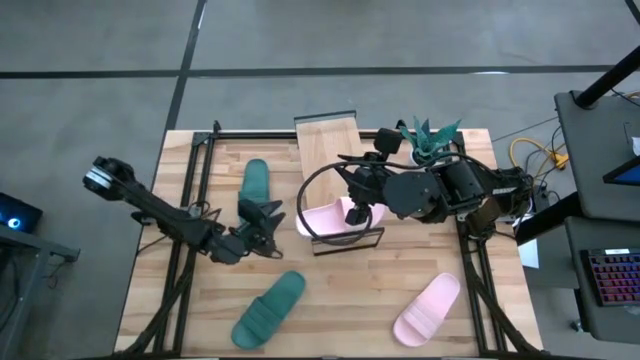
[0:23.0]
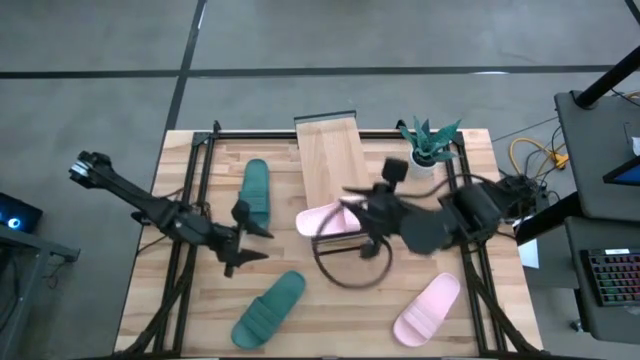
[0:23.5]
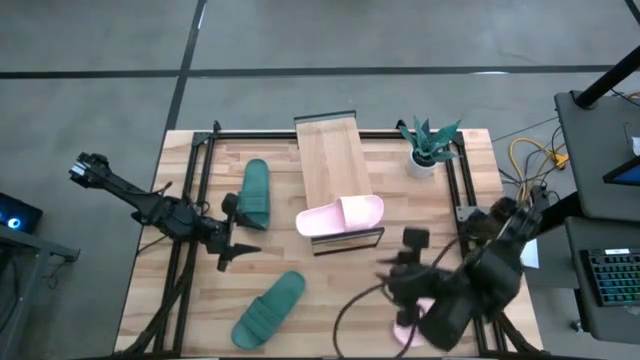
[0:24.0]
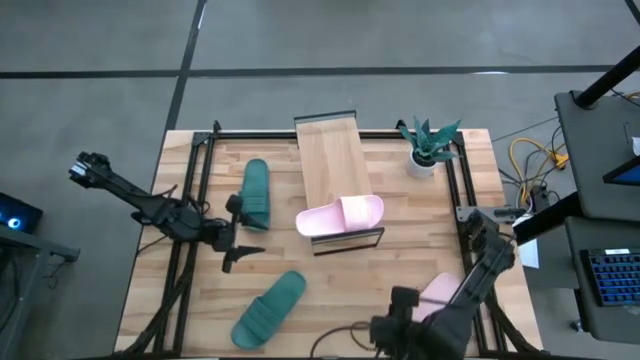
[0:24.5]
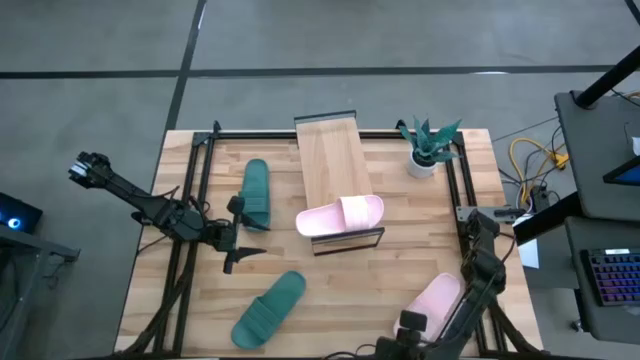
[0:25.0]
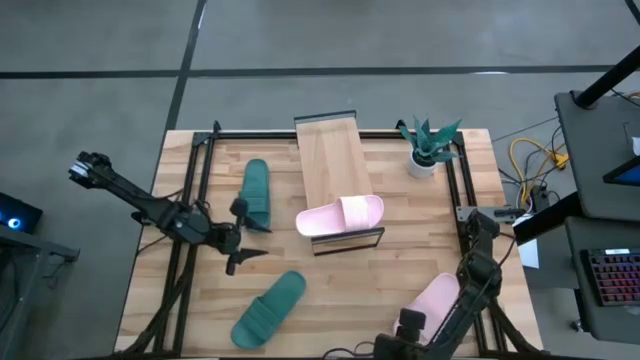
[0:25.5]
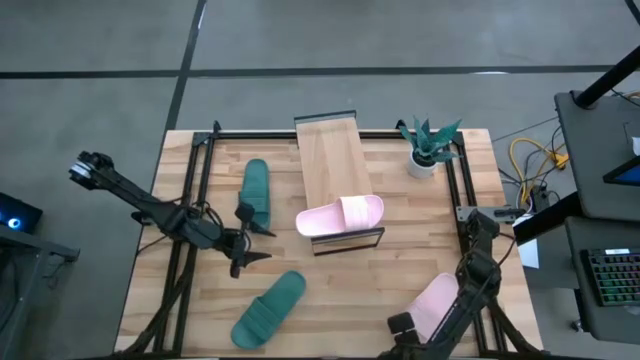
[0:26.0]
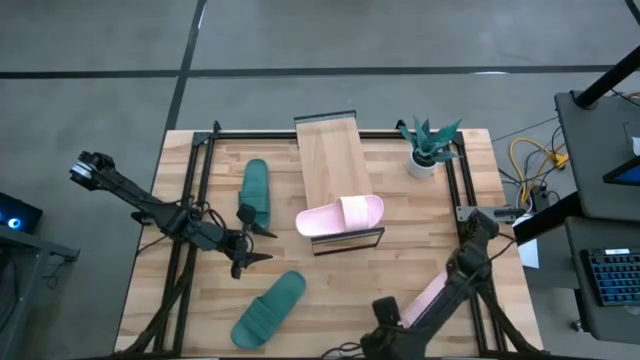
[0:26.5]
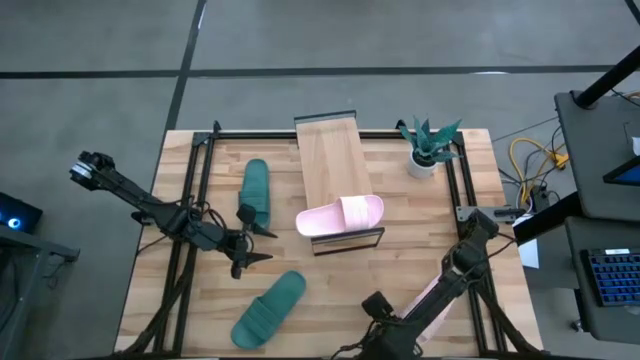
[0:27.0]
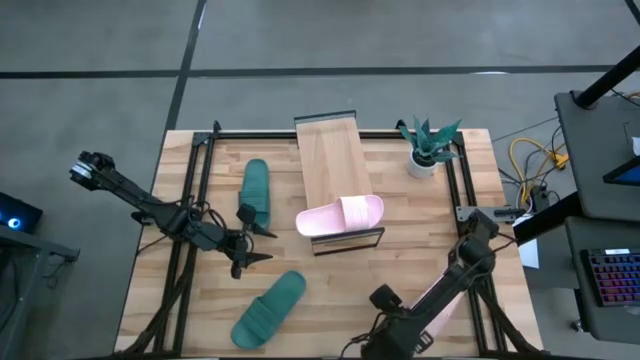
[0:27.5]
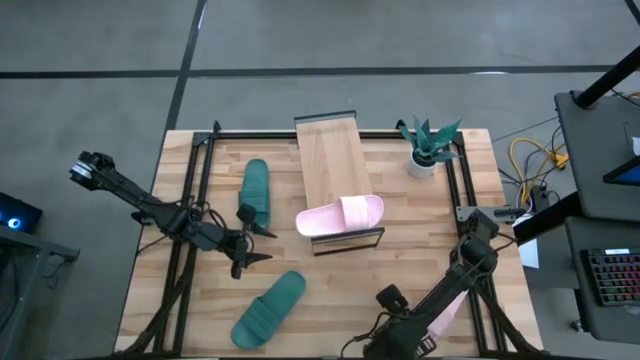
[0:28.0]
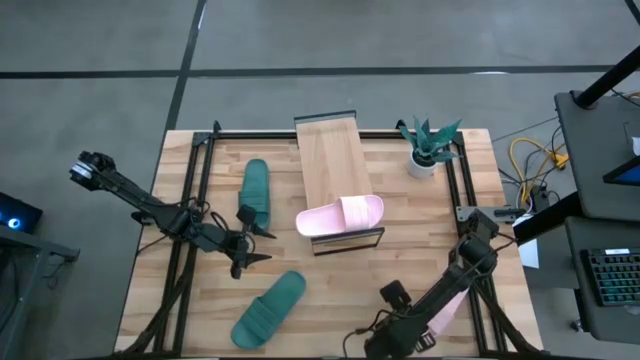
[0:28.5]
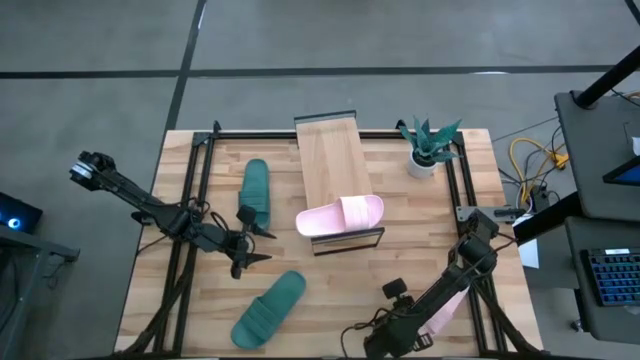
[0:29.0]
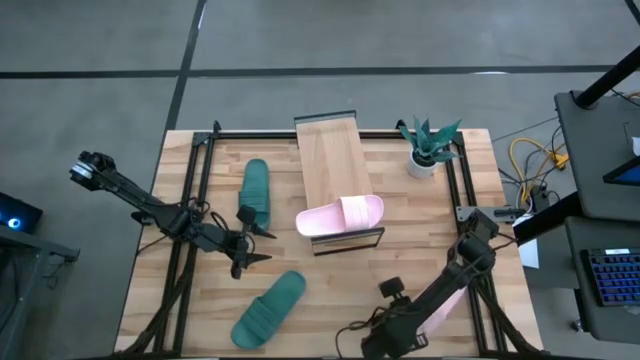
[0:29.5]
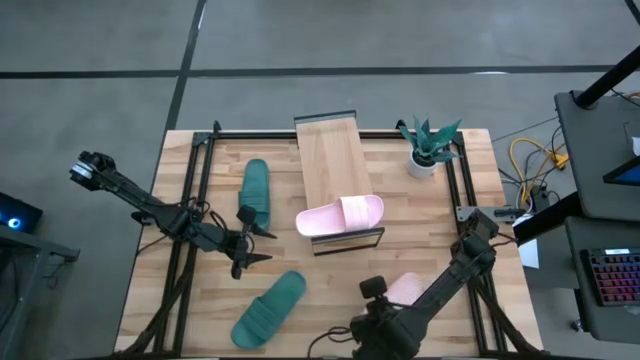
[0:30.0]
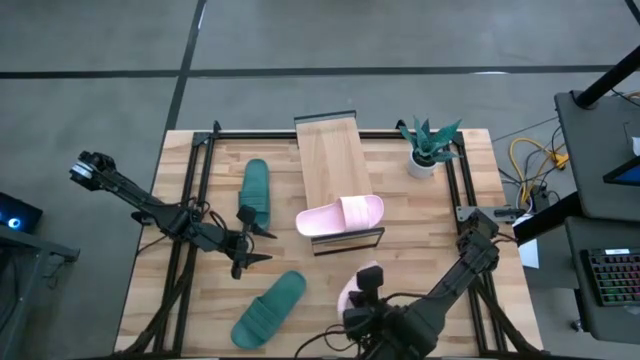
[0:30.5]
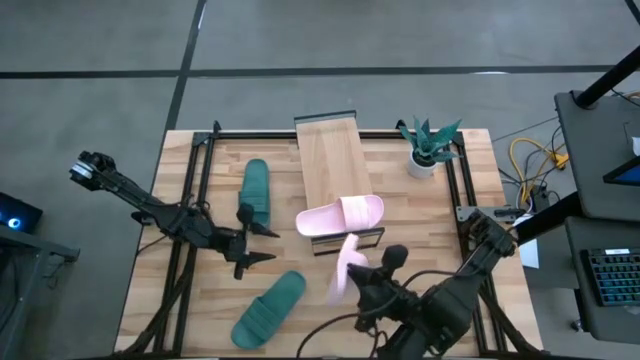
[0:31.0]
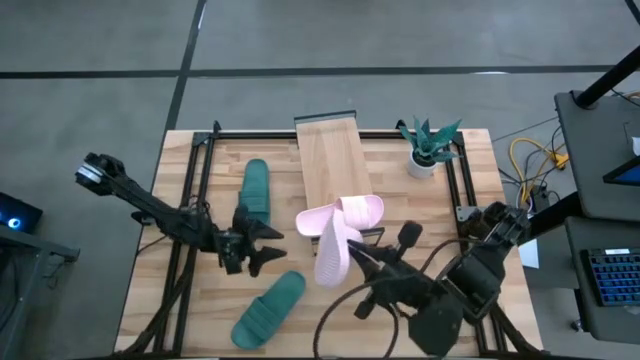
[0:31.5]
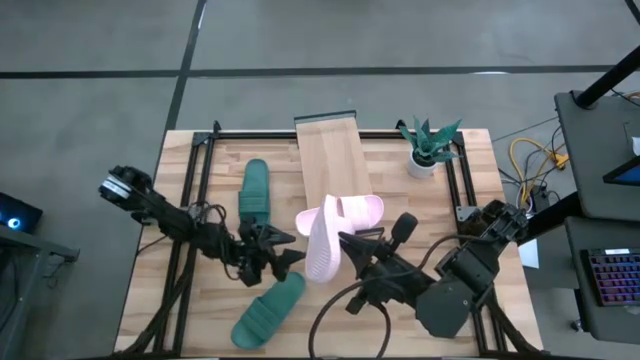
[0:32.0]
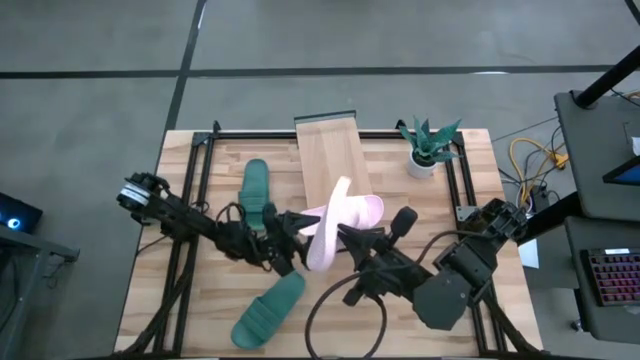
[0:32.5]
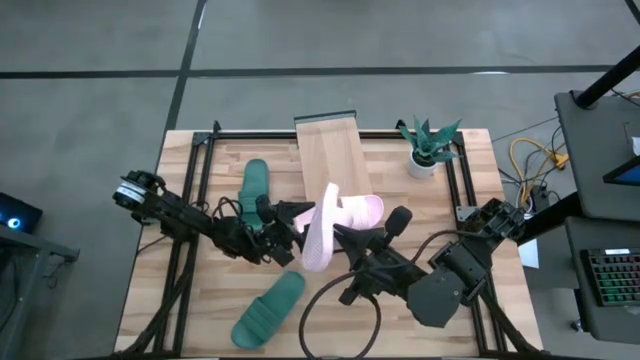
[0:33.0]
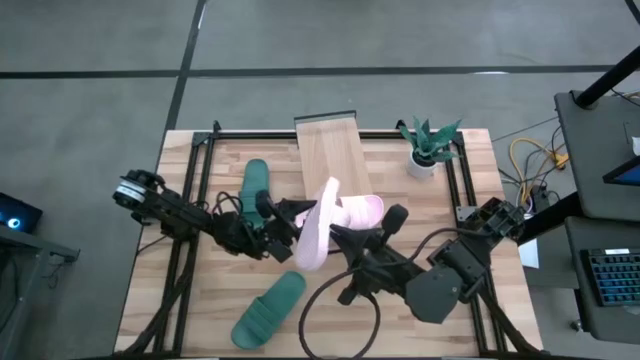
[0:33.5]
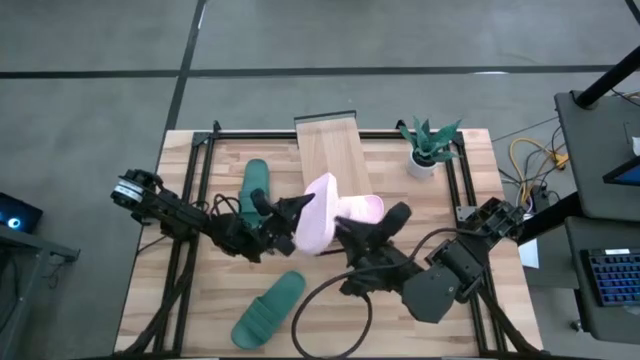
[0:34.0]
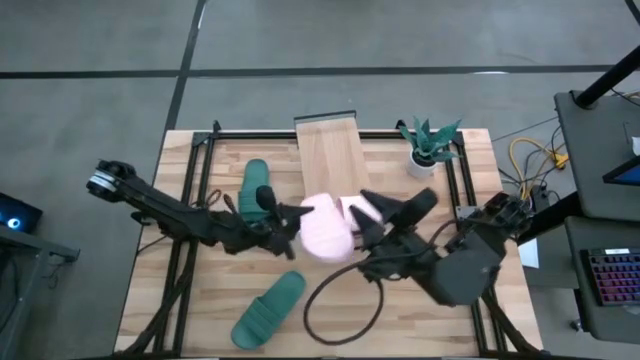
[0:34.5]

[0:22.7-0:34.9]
Task: Pick and place slides into the shelf
Put the pink slide on the shelf

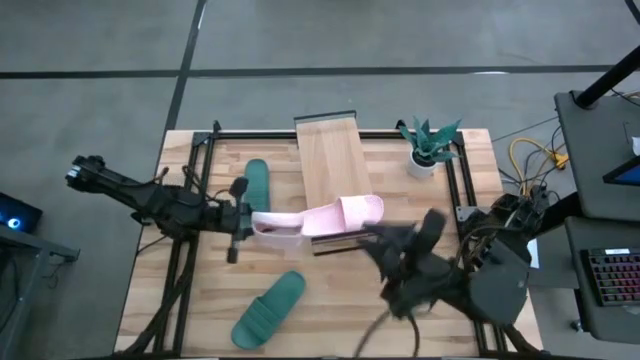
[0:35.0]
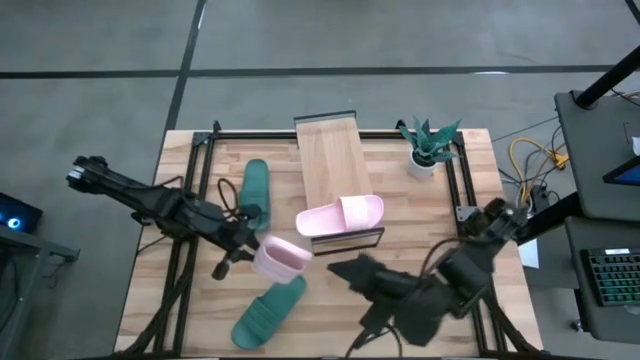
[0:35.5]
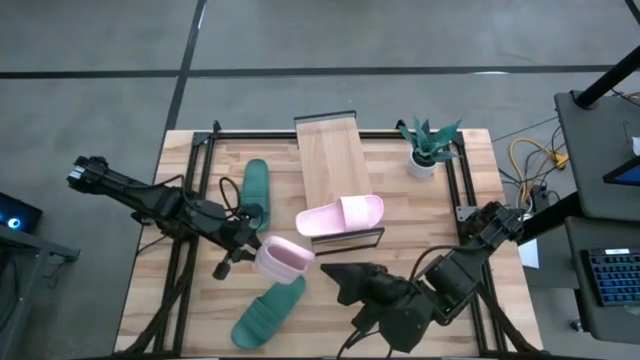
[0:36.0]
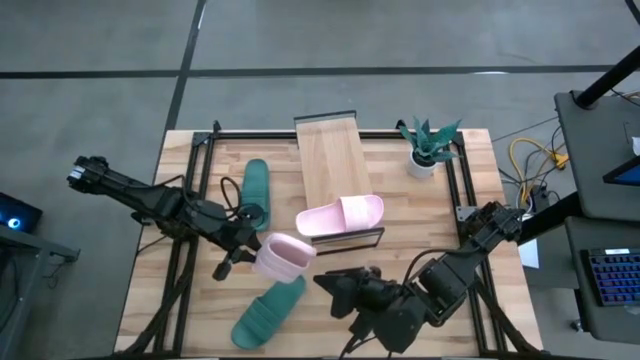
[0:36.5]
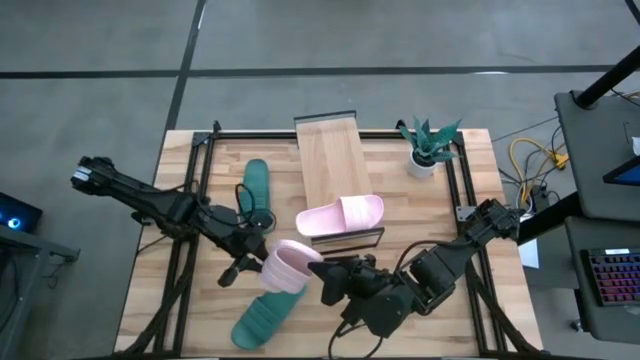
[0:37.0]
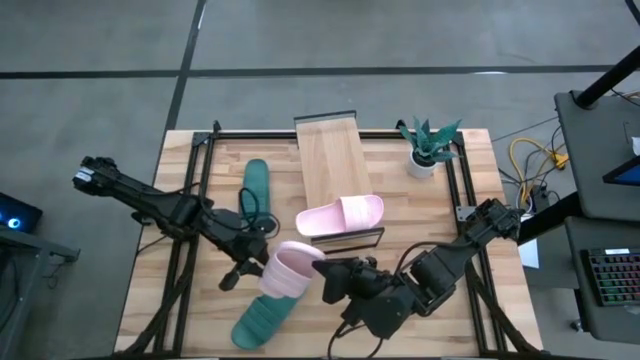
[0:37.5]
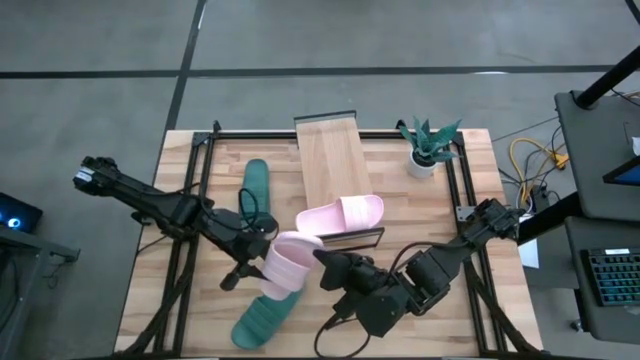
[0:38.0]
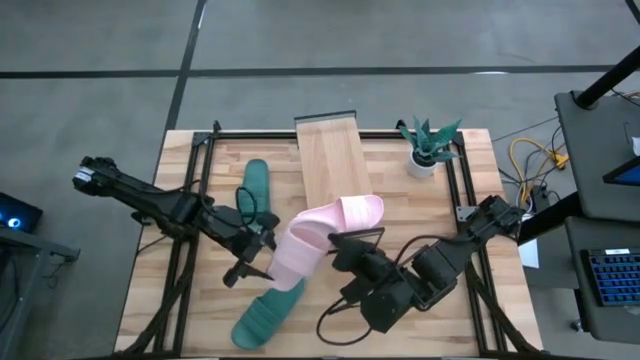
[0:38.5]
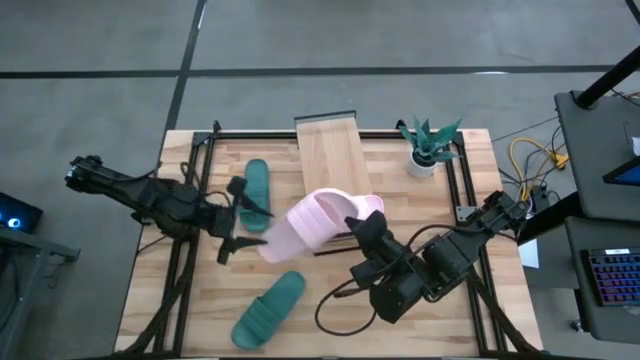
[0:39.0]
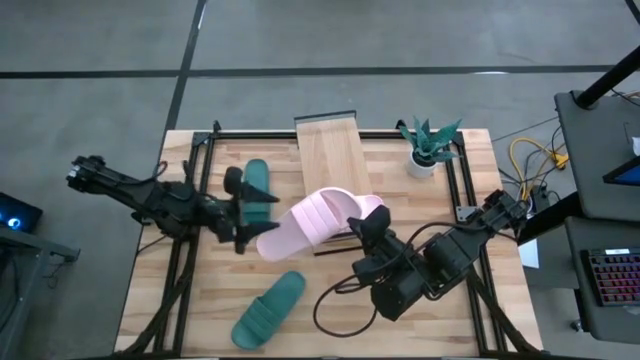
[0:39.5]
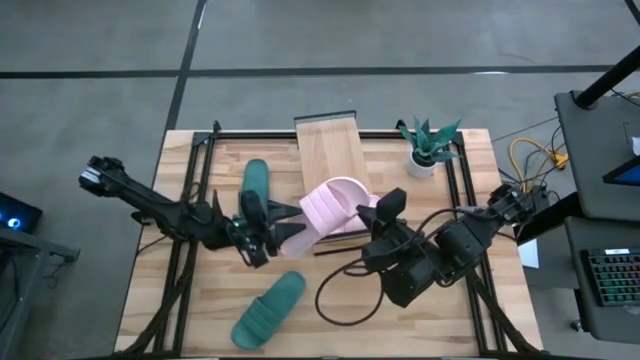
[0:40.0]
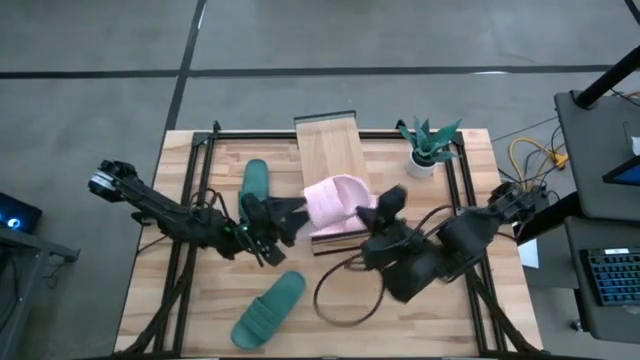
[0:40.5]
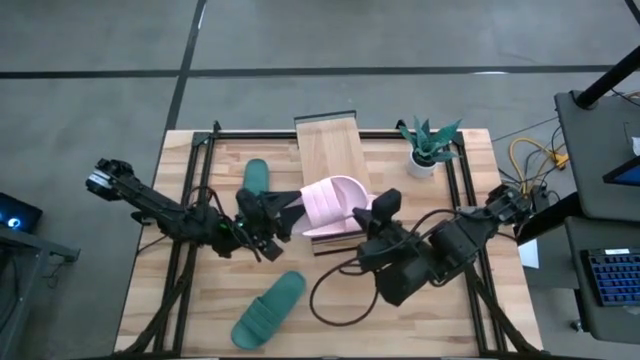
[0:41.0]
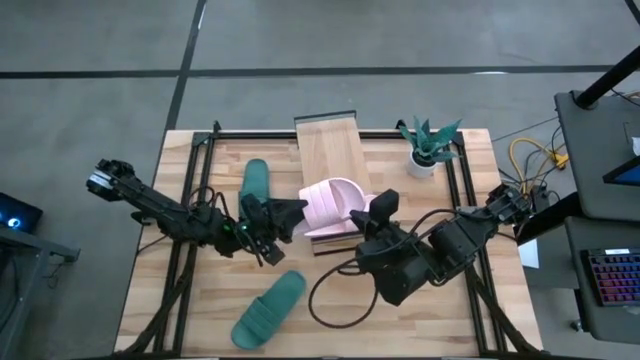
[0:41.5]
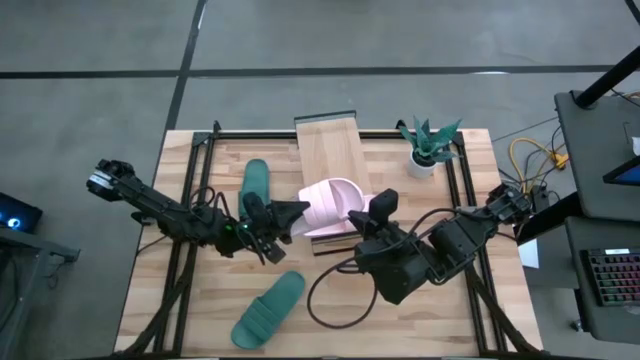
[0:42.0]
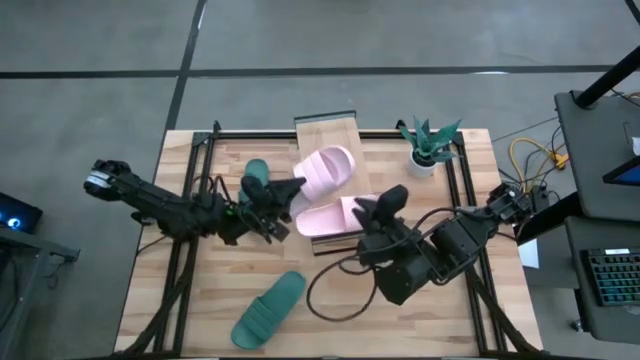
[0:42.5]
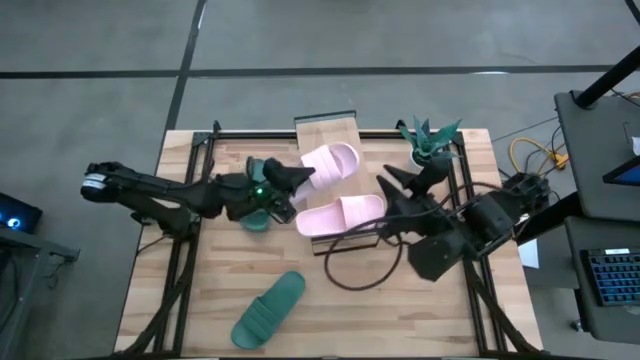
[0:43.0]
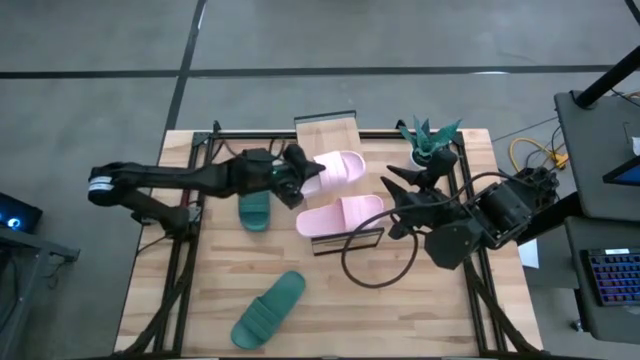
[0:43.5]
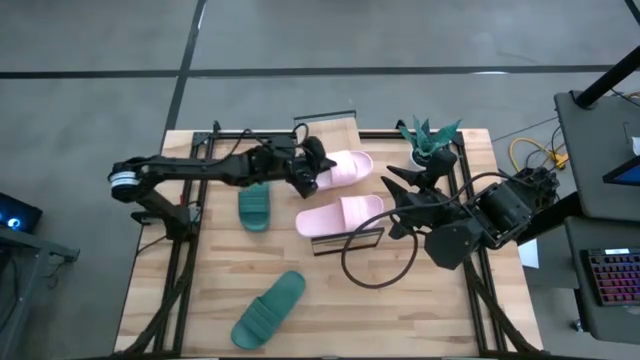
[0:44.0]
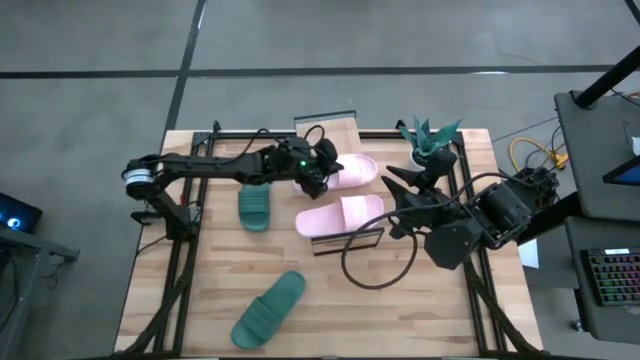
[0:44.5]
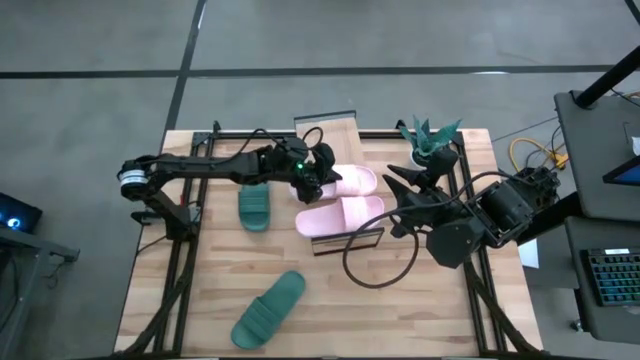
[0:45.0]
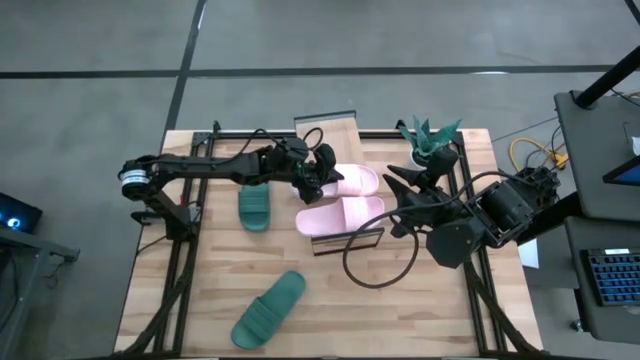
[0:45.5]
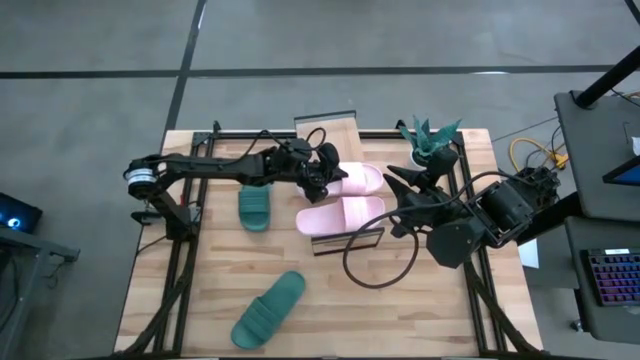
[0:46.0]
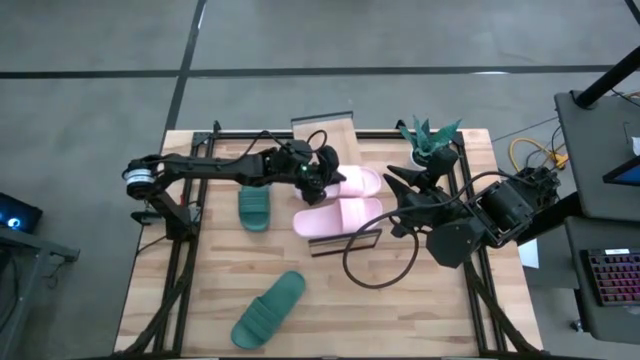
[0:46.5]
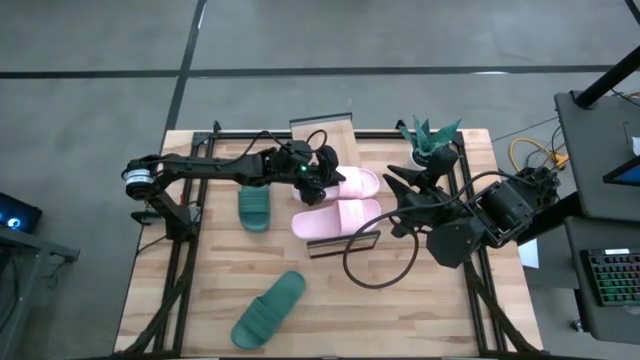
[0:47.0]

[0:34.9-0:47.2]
Put the pink slide on the shelf
